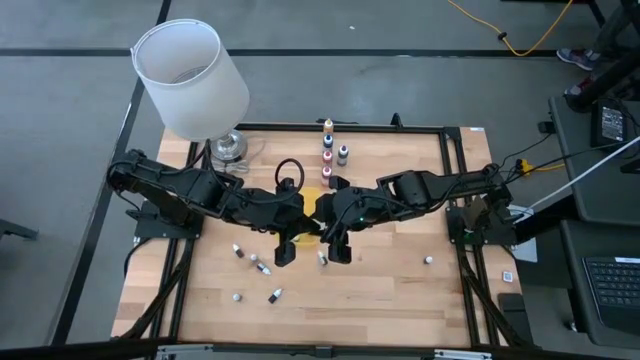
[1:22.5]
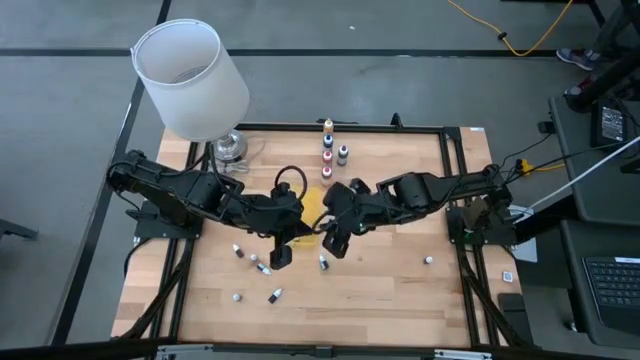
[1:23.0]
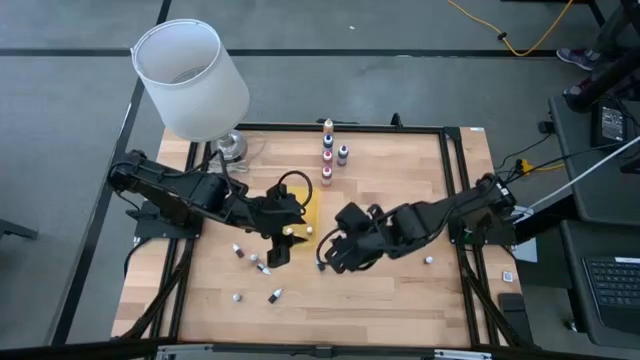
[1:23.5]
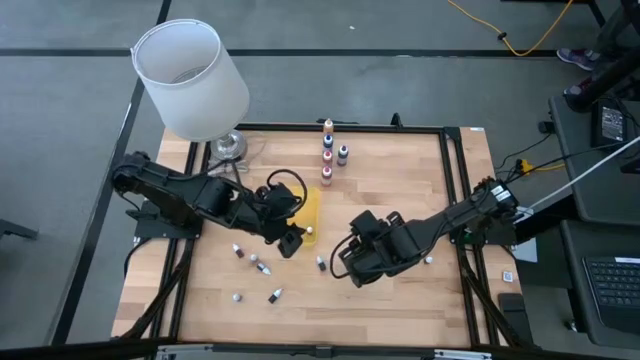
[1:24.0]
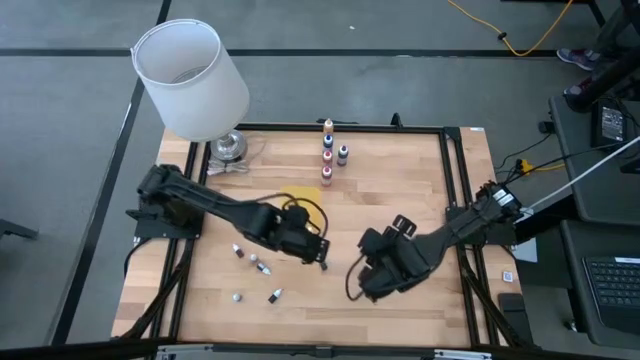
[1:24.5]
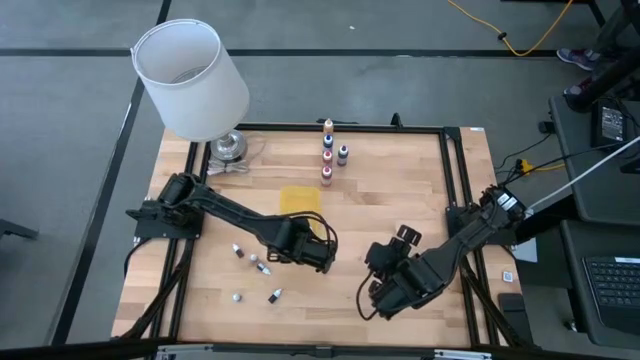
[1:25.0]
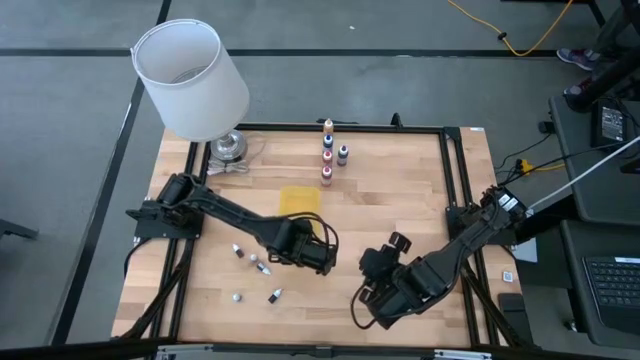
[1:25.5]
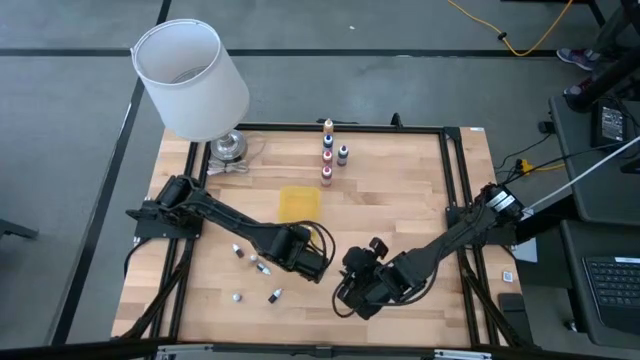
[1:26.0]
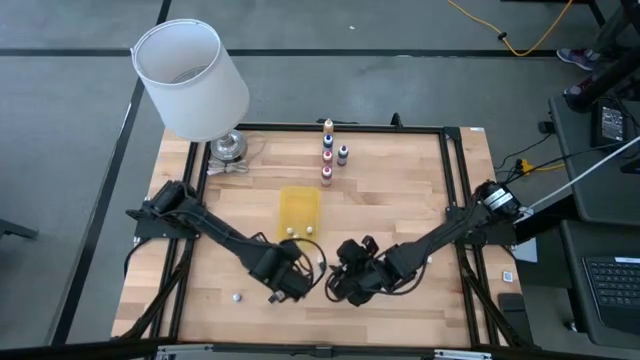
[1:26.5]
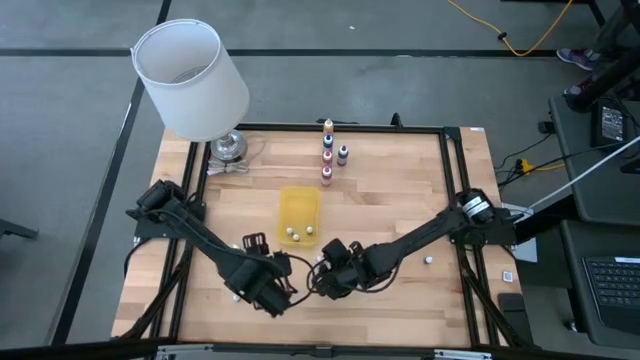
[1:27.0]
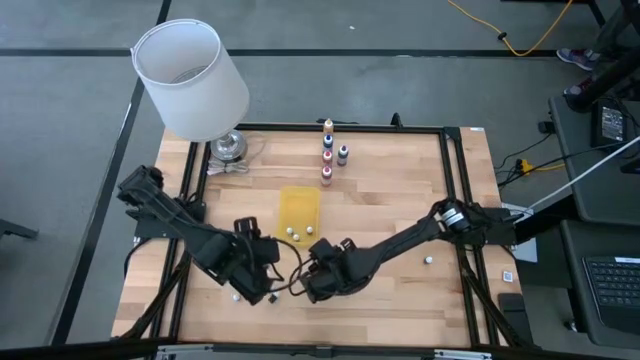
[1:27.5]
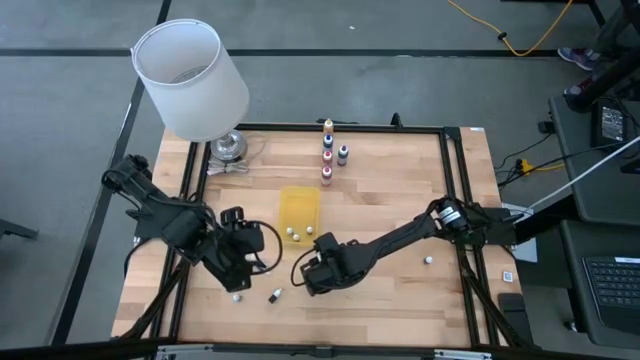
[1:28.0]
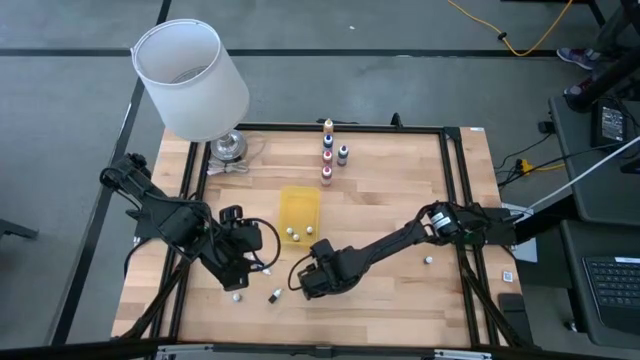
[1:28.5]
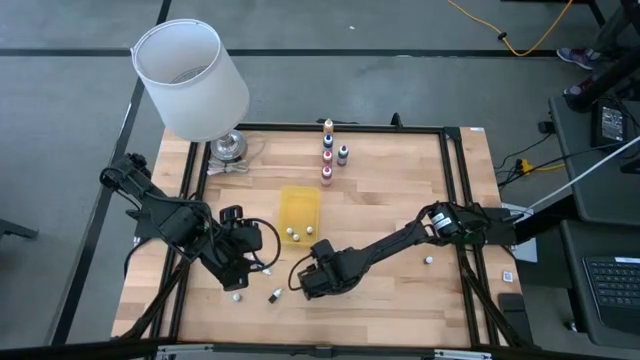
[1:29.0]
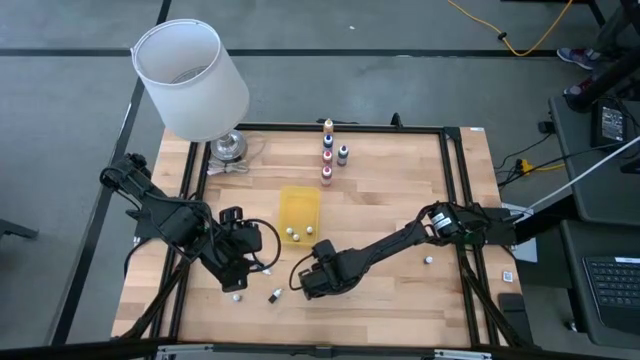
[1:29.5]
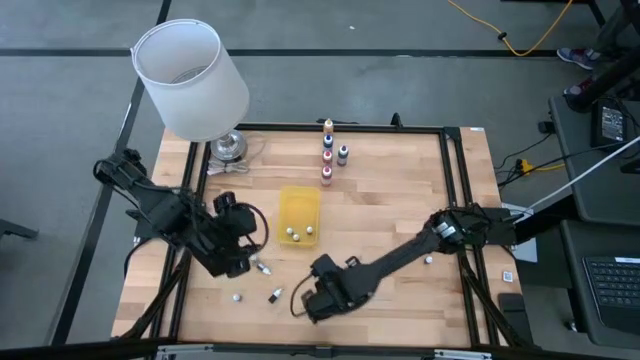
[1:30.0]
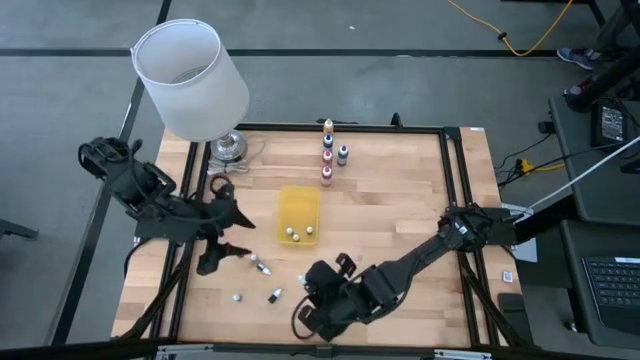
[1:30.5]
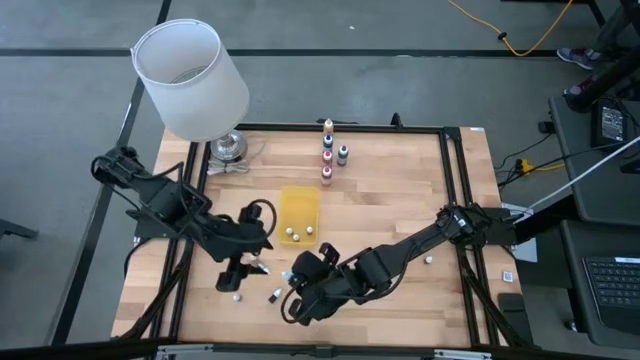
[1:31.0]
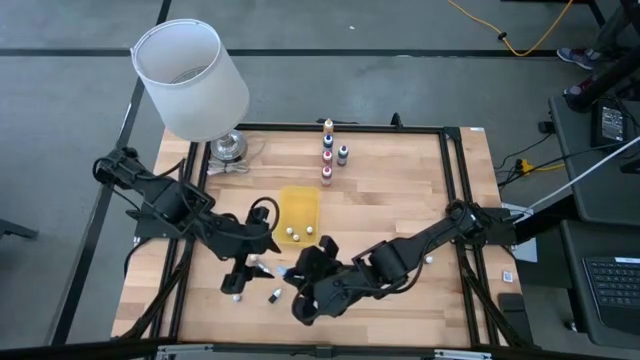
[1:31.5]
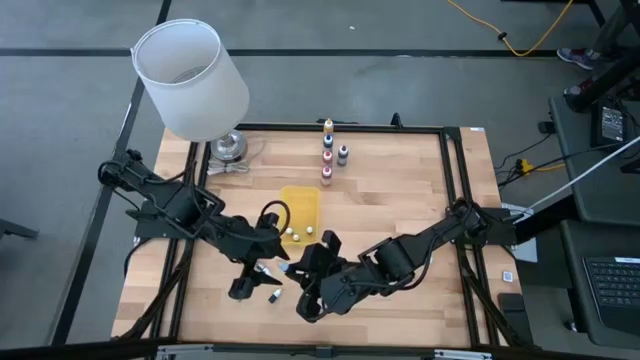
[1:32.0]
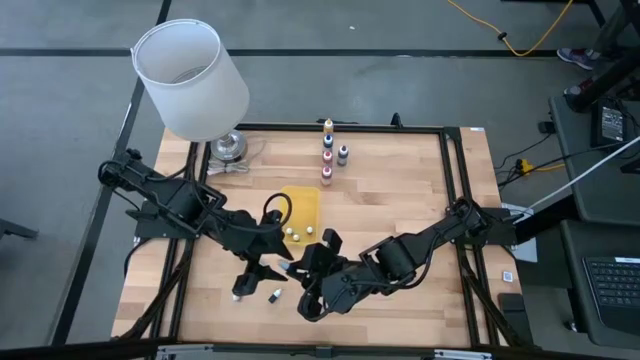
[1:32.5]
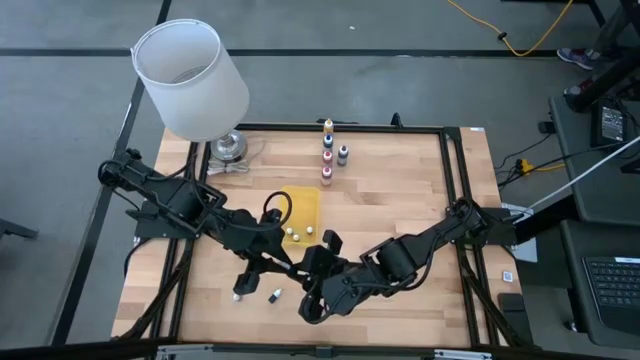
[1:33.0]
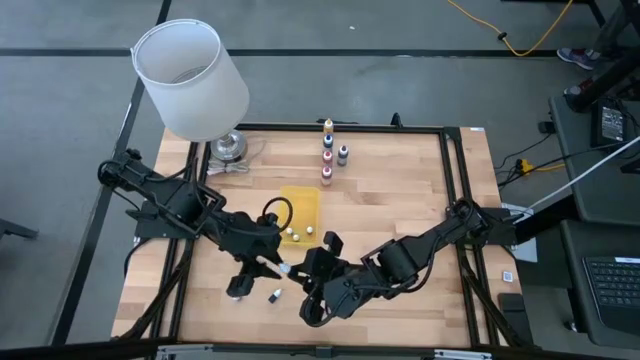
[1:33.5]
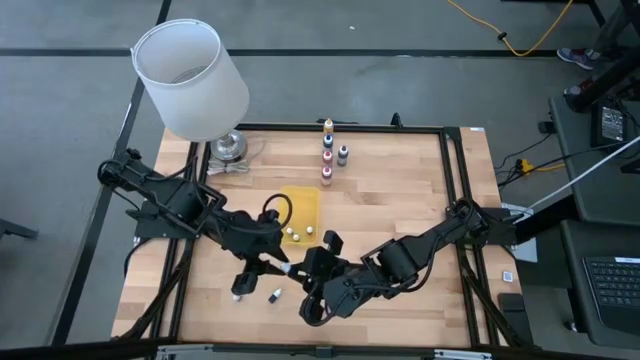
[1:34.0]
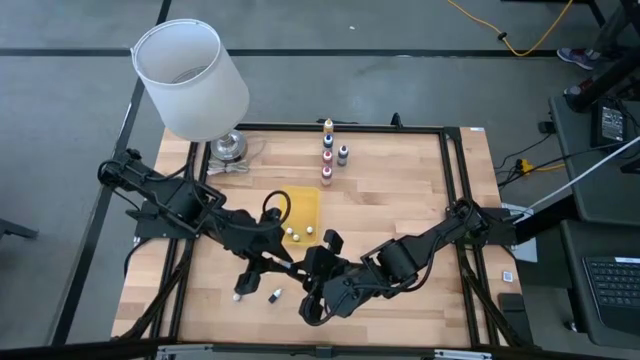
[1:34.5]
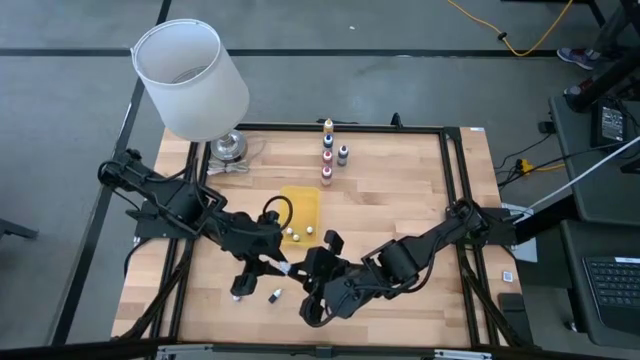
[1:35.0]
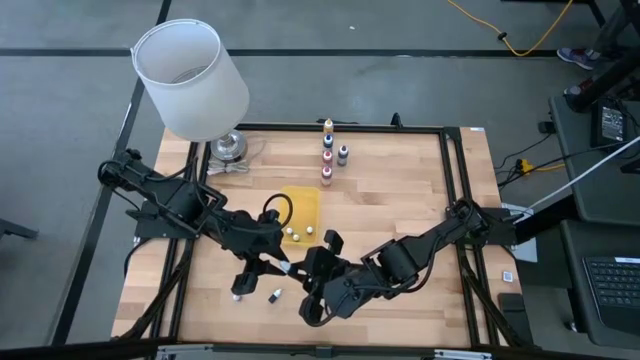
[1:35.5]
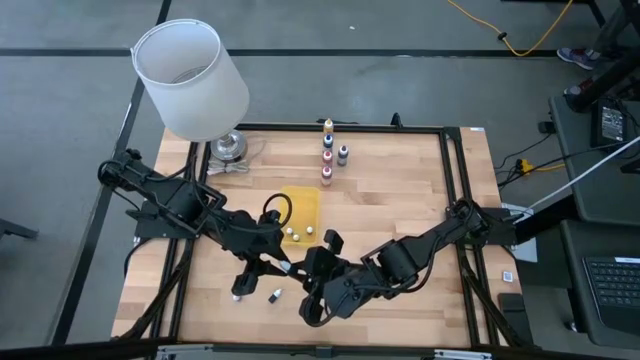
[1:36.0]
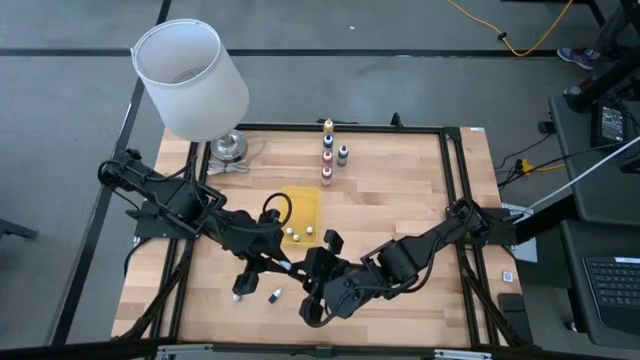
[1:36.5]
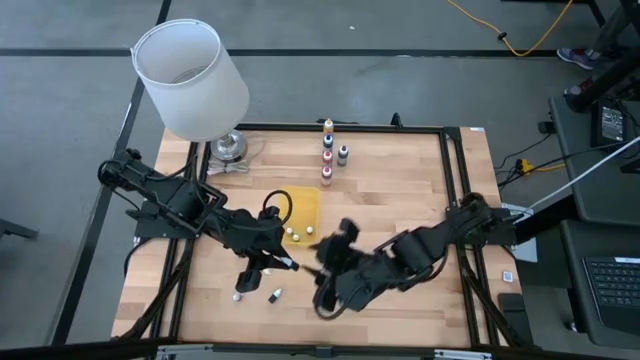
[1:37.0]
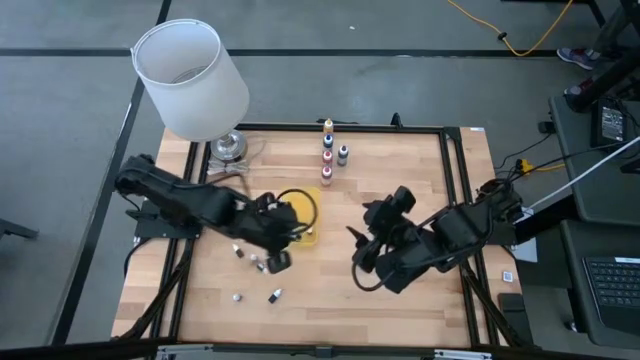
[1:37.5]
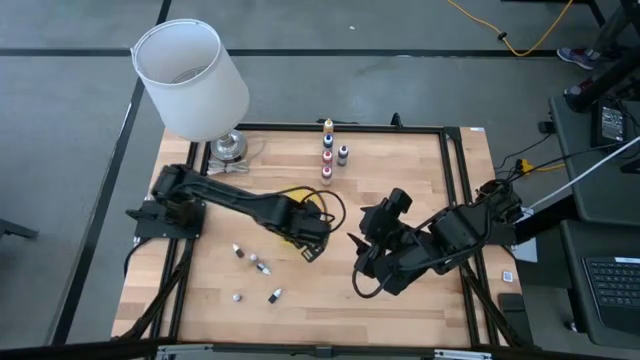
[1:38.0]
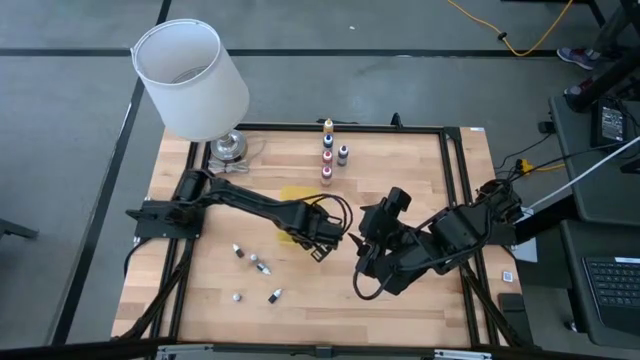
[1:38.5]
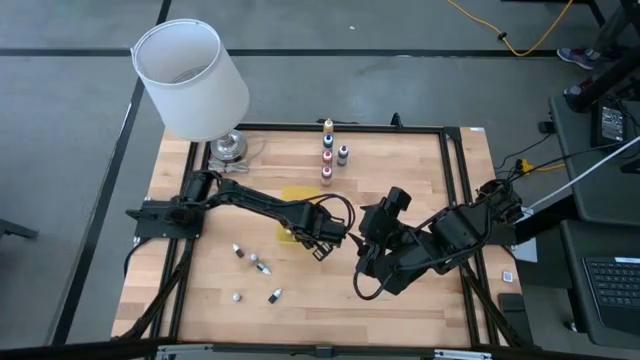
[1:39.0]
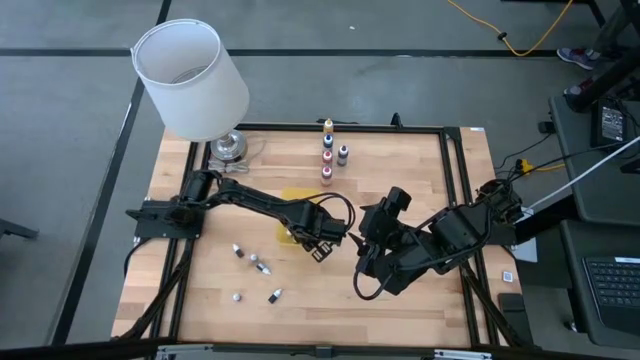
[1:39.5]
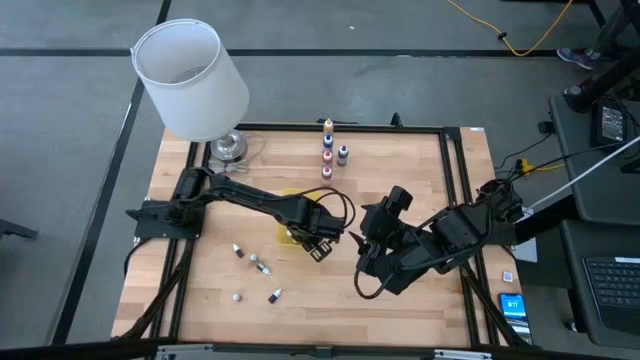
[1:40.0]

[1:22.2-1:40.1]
Task: Pick & Place food coloring
Put the small black bottle into the yellow bin
